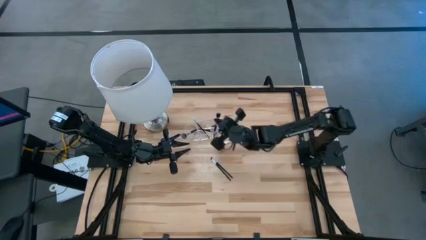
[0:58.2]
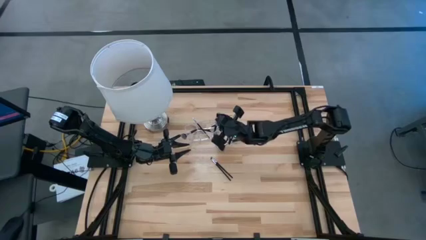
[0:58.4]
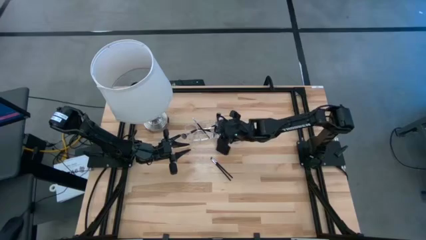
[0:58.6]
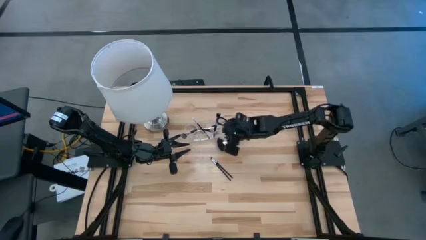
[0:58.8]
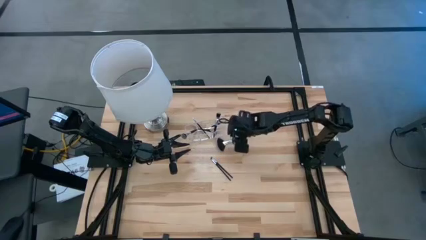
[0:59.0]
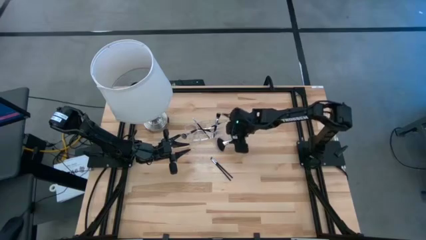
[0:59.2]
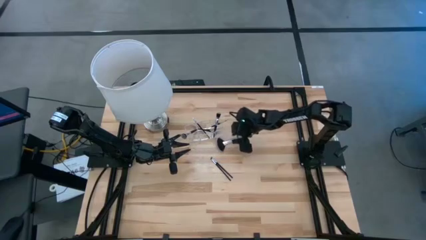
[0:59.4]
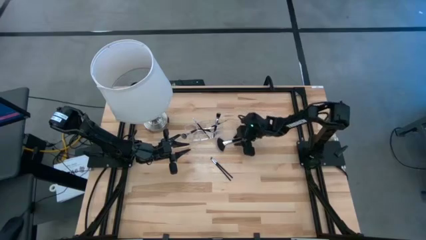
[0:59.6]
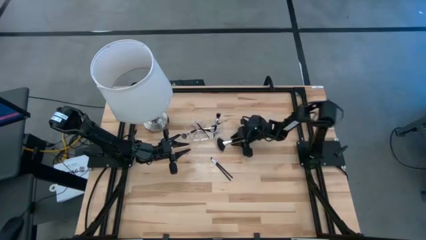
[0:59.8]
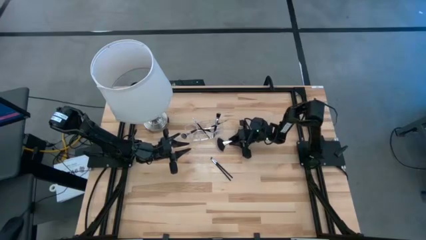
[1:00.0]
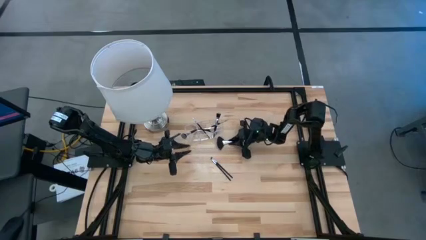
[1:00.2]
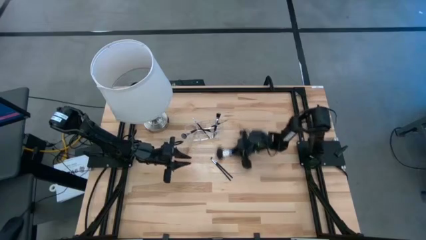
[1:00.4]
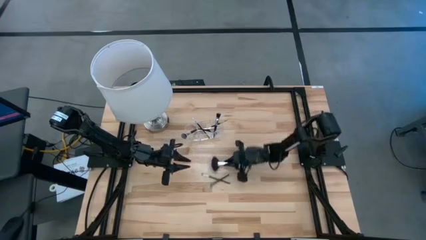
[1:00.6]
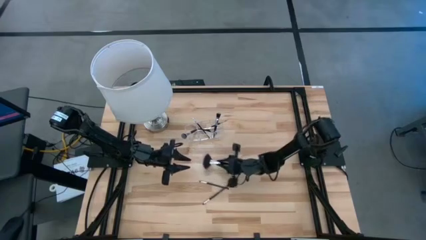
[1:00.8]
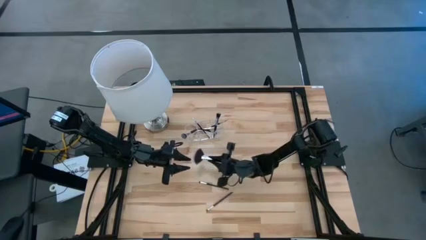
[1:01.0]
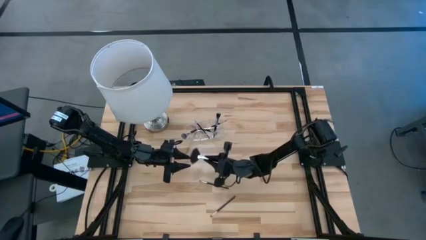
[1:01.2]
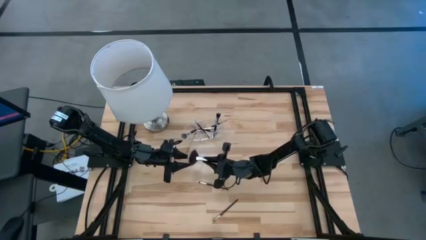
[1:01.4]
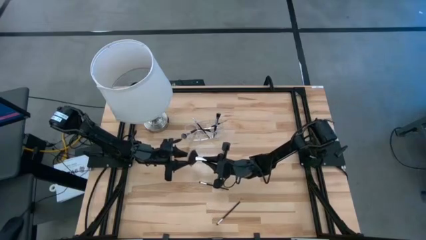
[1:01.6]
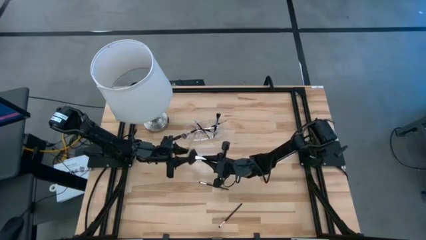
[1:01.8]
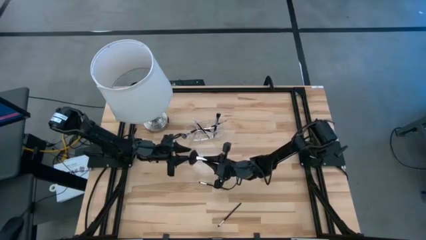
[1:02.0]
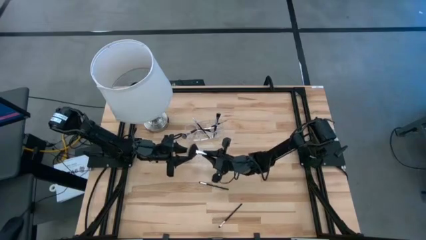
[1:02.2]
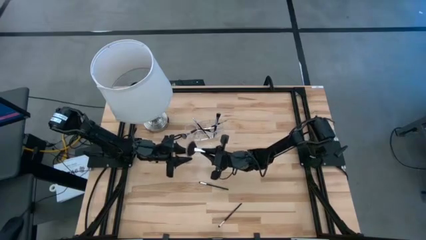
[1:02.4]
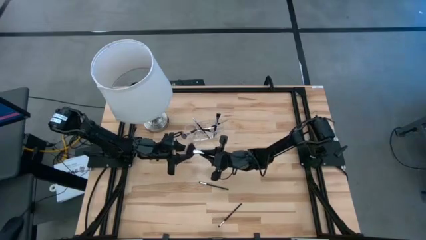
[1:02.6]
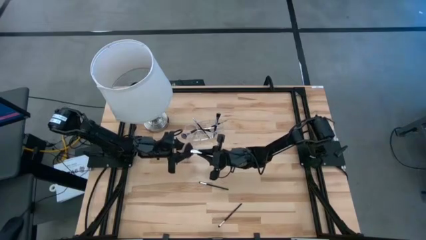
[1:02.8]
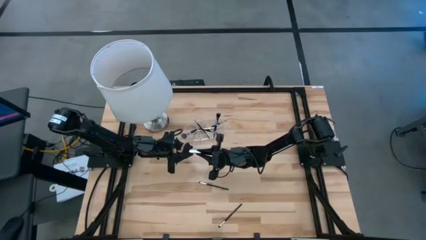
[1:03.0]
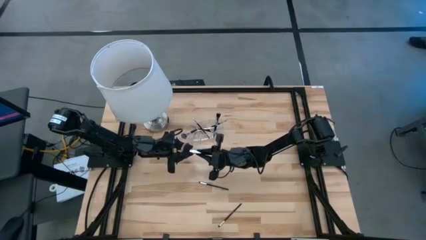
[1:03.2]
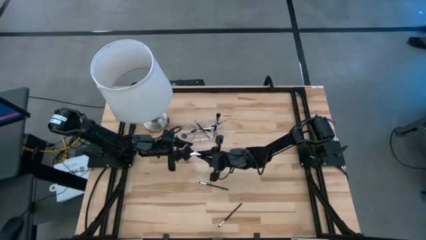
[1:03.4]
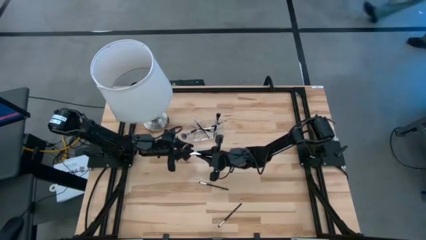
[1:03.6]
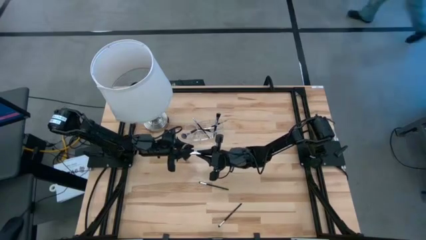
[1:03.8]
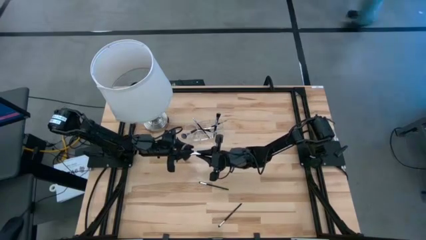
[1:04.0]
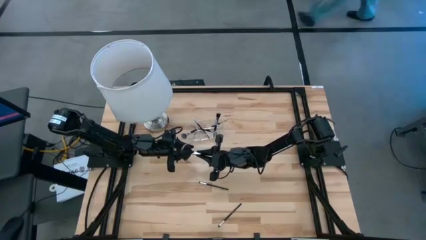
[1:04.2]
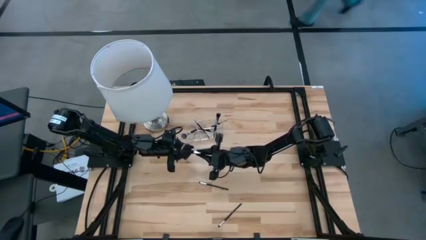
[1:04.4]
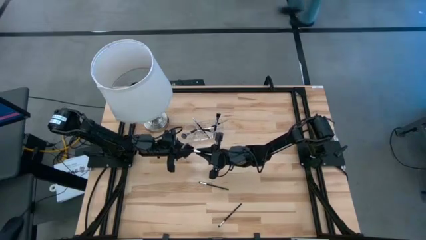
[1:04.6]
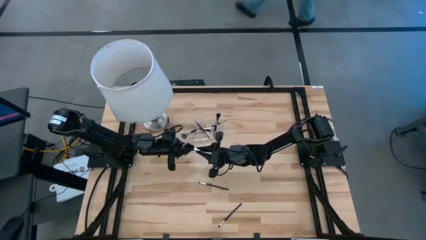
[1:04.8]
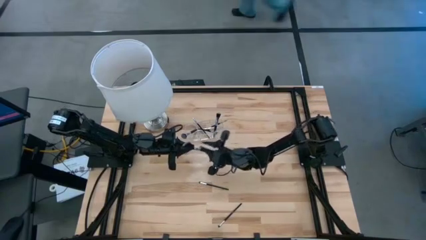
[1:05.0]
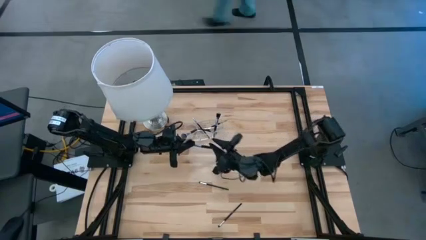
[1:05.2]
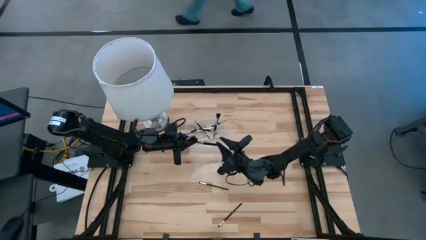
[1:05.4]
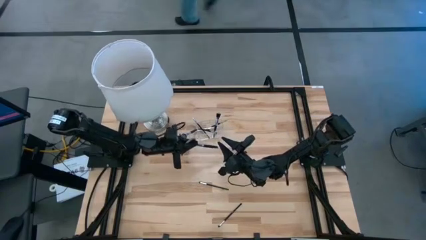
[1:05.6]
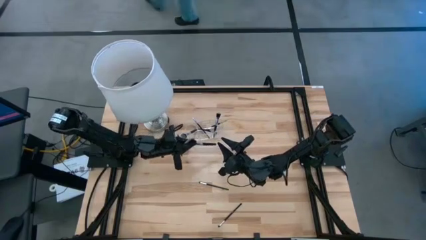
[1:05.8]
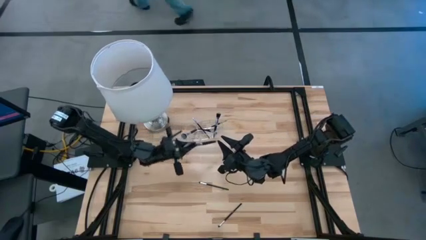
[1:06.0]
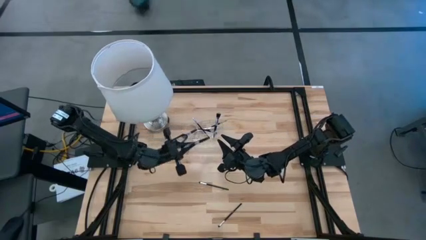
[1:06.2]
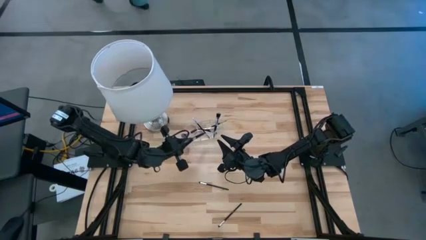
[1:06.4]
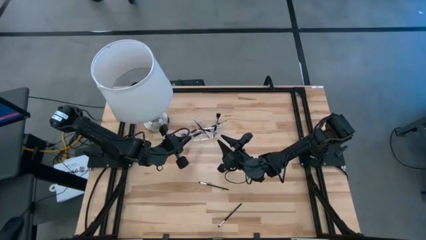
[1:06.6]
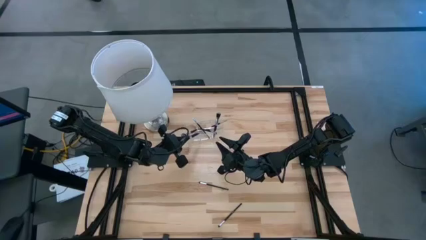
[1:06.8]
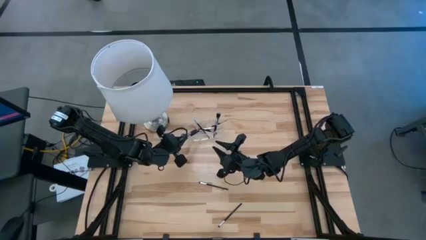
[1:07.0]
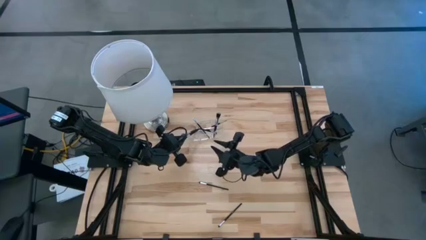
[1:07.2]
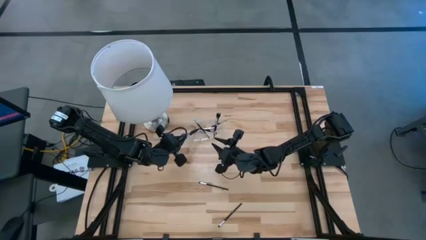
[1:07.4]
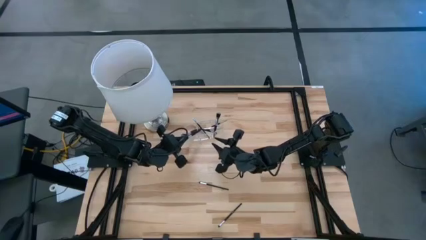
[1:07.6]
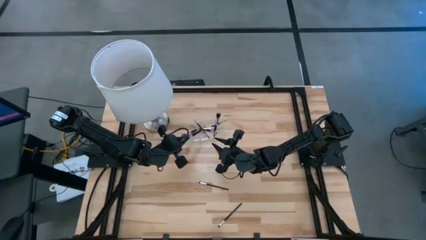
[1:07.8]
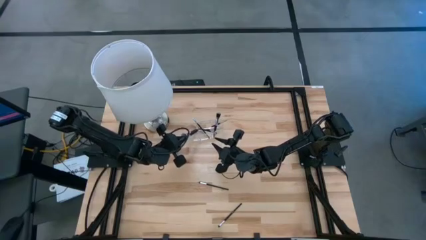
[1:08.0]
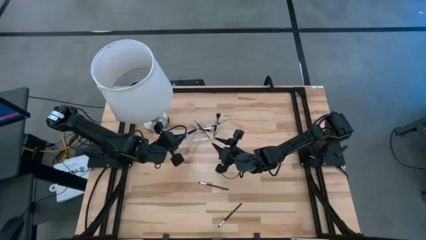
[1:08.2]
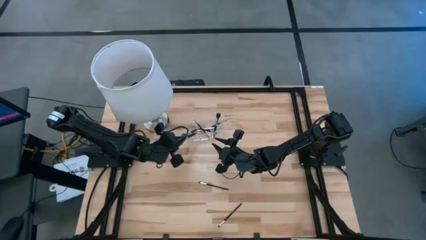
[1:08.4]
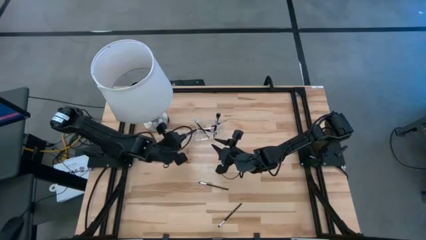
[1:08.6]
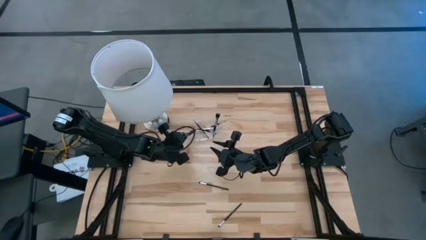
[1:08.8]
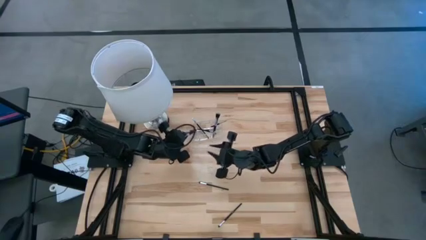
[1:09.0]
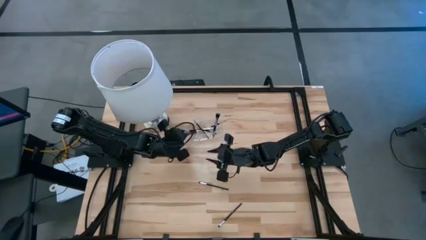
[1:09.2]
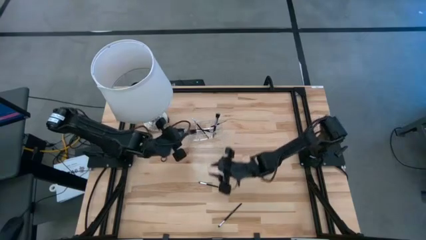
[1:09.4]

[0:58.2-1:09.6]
Task: Put items in baskets/containers
Put the black highlighter brush into the transparent organizer

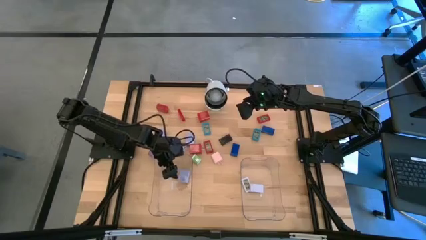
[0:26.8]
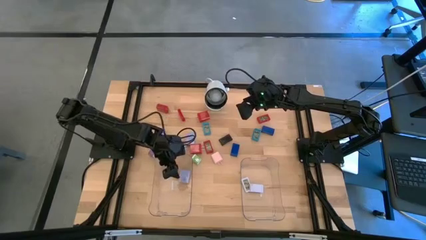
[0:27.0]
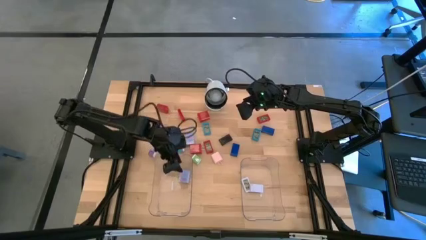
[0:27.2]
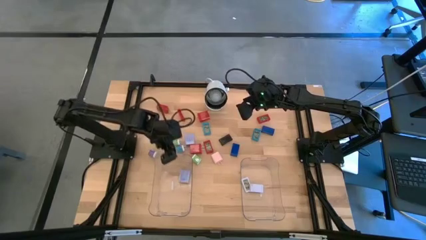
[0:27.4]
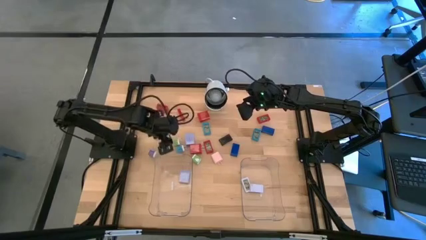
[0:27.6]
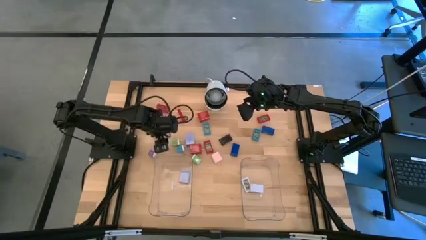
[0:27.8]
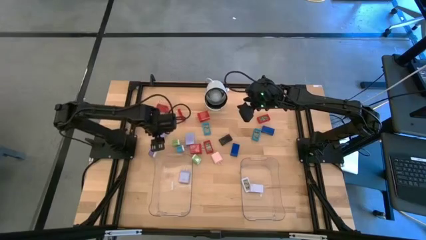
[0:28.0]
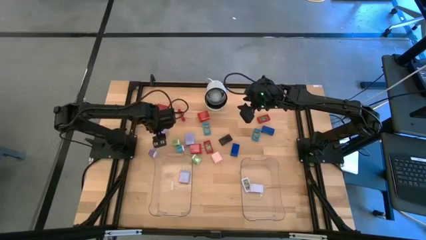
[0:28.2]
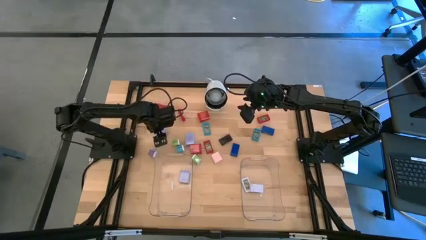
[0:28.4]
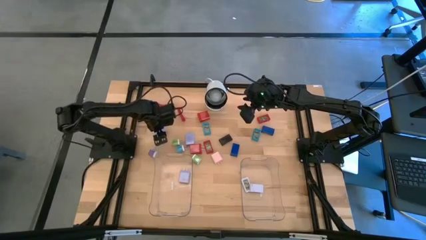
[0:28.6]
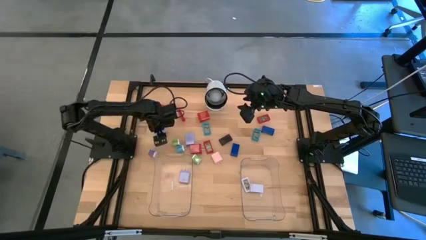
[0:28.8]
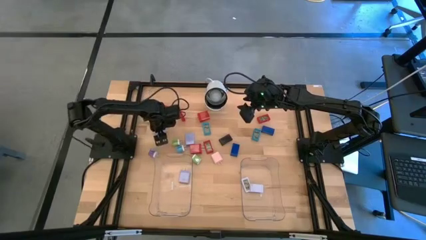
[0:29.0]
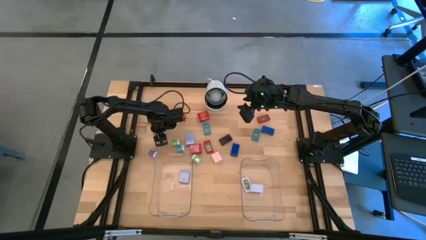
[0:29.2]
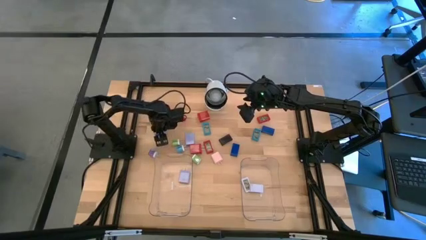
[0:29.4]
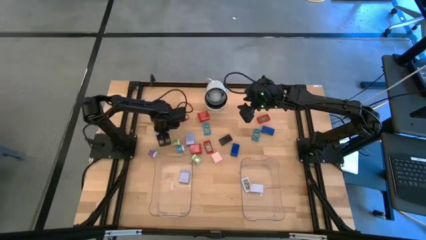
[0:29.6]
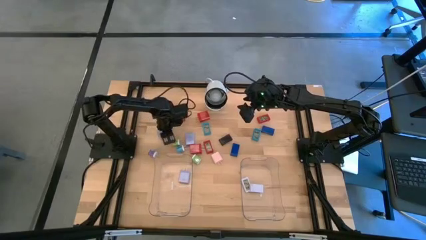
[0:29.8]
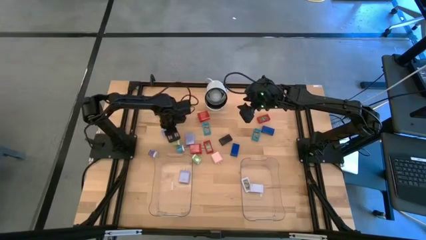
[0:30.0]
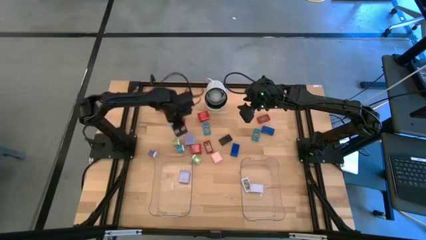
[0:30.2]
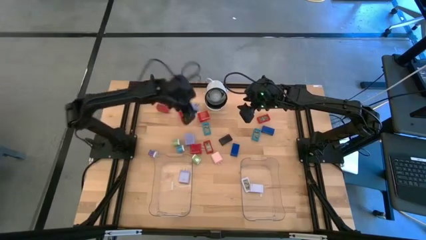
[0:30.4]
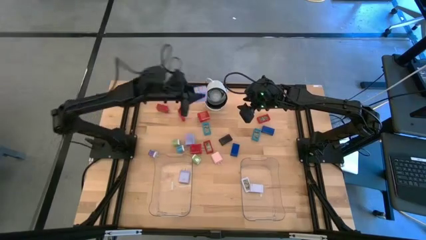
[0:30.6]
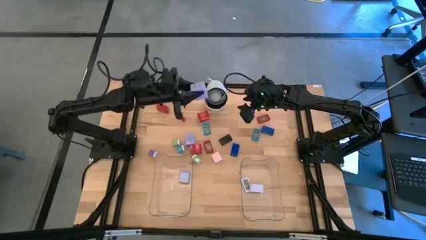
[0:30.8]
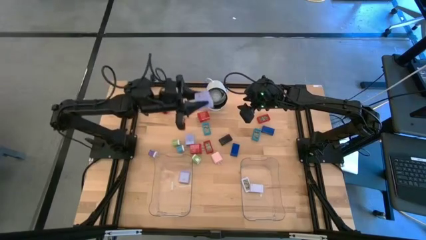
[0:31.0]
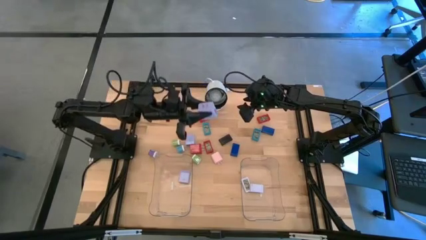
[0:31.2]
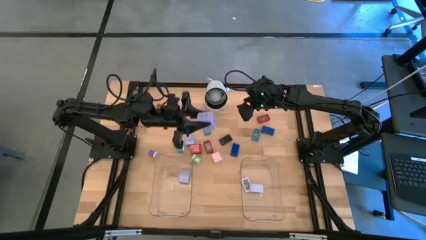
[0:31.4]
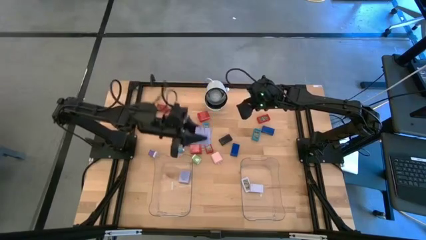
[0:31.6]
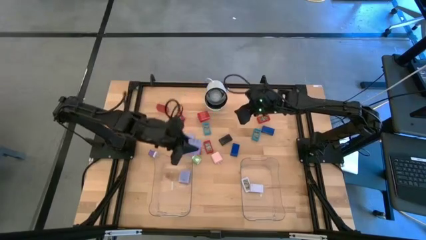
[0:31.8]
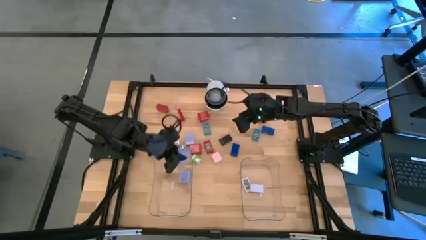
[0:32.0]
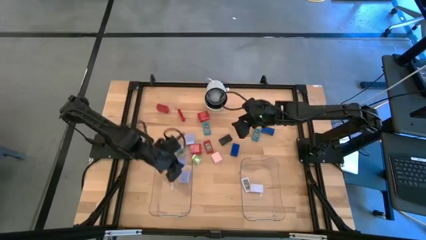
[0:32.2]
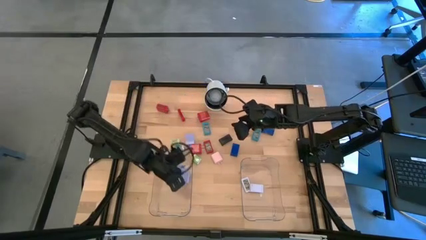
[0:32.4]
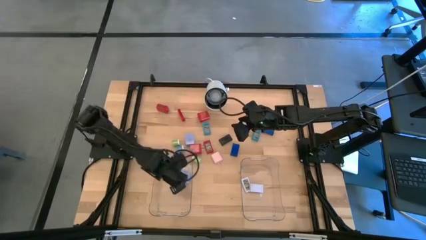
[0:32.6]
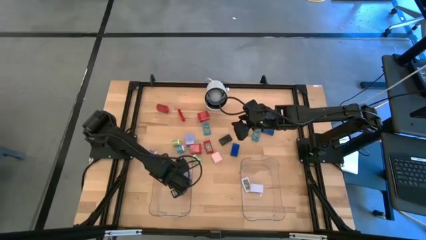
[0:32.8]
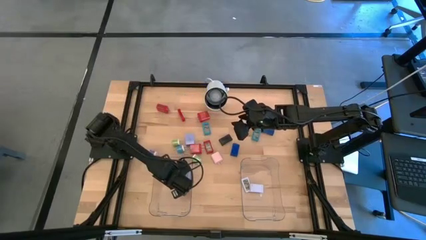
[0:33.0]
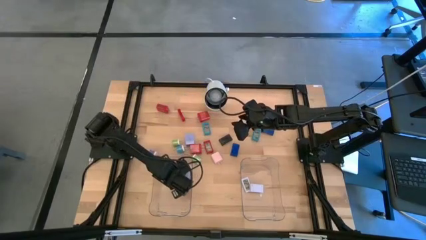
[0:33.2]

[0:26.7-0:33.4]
Task: Pick & Place Office items
Put the left purple charger adapter into the left transparent bin
